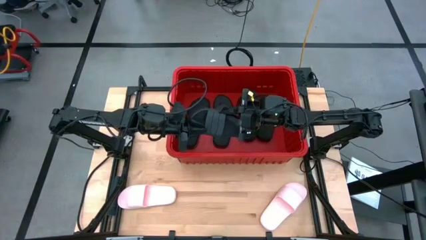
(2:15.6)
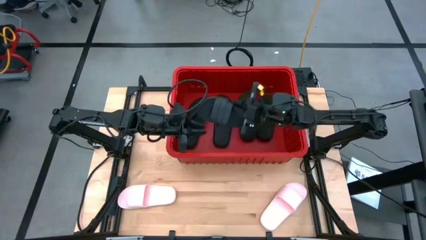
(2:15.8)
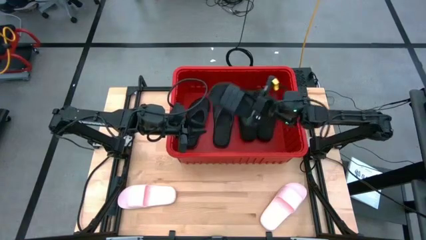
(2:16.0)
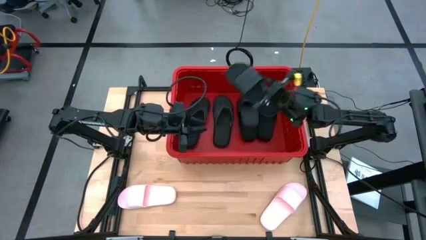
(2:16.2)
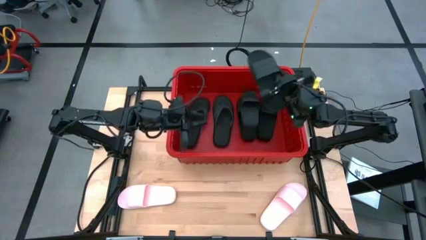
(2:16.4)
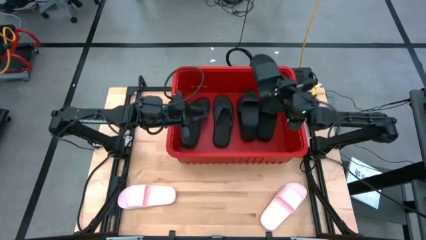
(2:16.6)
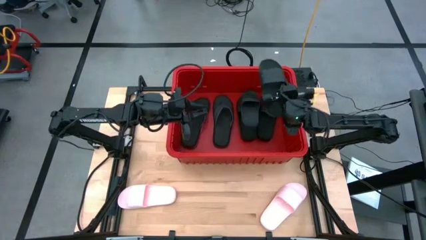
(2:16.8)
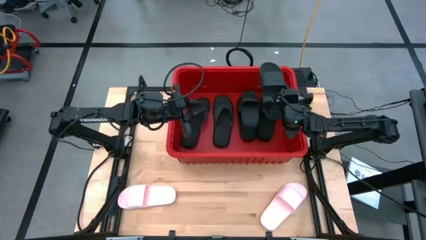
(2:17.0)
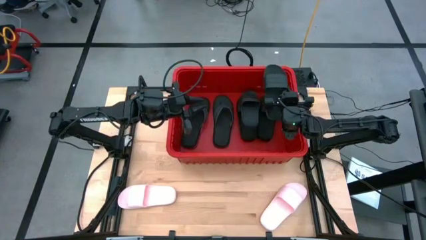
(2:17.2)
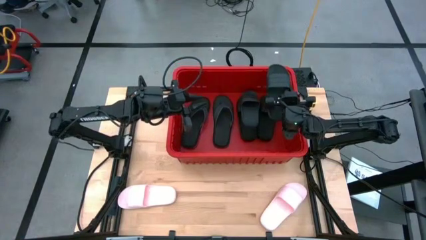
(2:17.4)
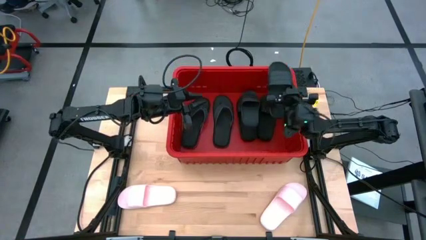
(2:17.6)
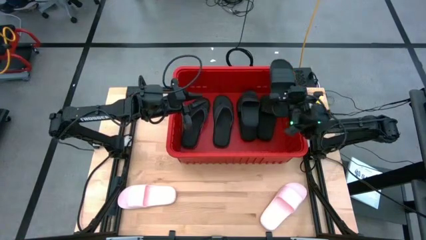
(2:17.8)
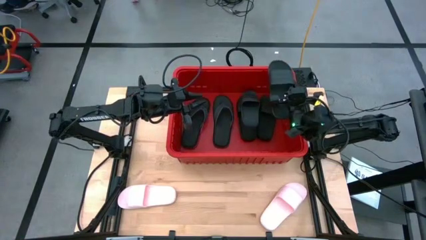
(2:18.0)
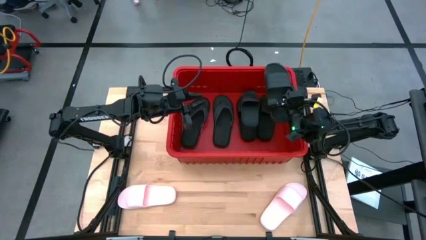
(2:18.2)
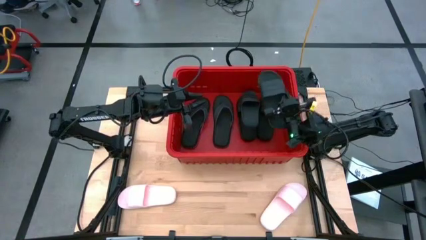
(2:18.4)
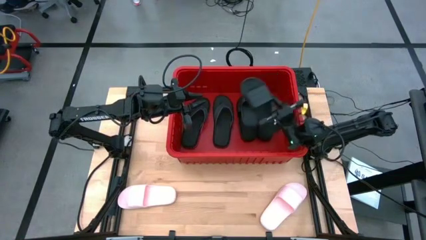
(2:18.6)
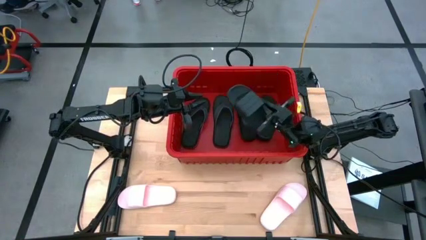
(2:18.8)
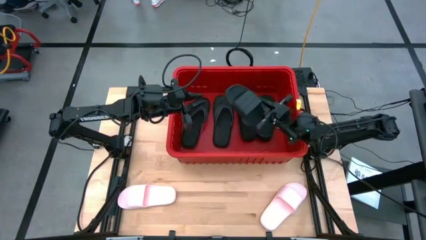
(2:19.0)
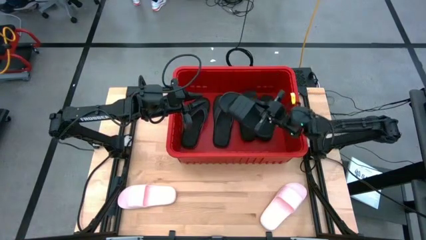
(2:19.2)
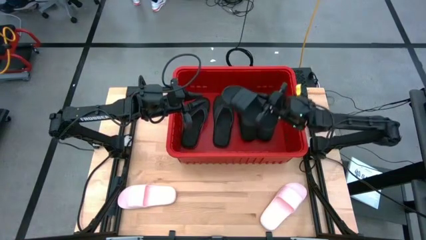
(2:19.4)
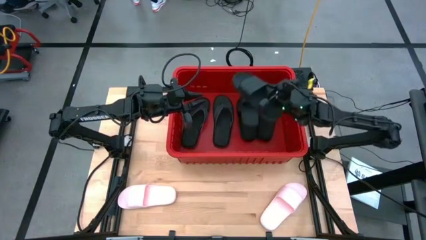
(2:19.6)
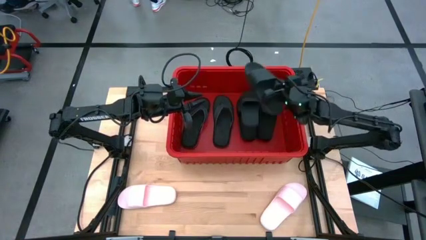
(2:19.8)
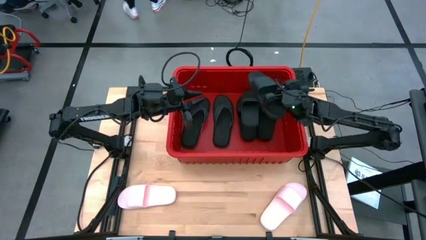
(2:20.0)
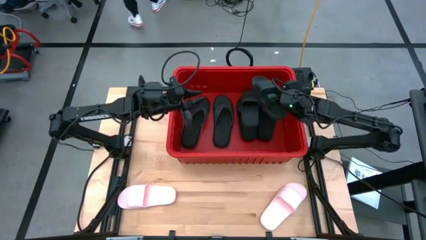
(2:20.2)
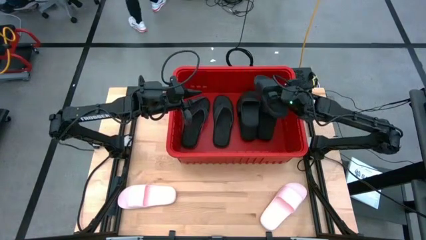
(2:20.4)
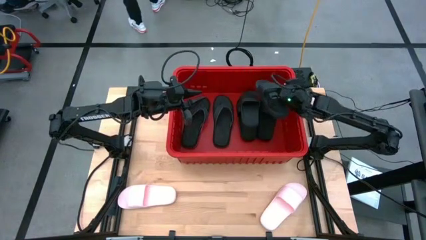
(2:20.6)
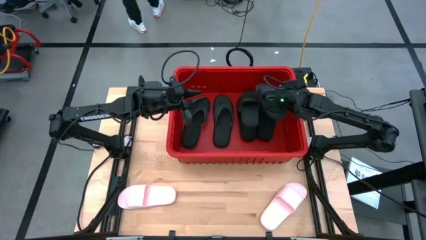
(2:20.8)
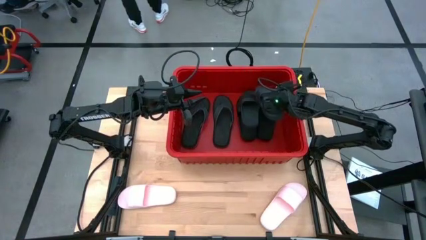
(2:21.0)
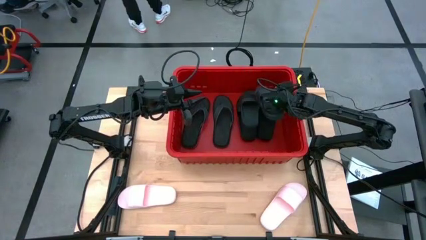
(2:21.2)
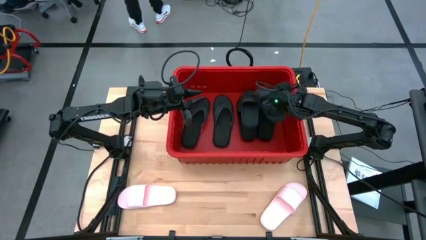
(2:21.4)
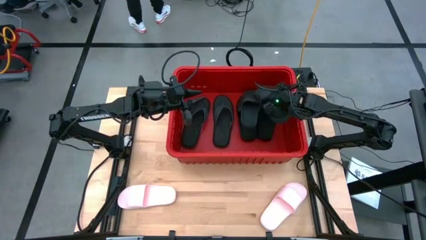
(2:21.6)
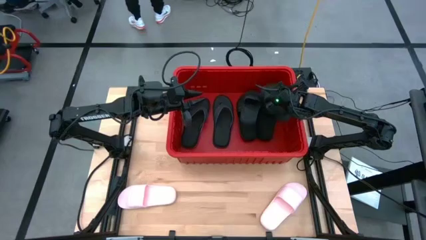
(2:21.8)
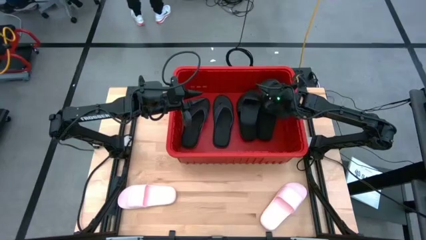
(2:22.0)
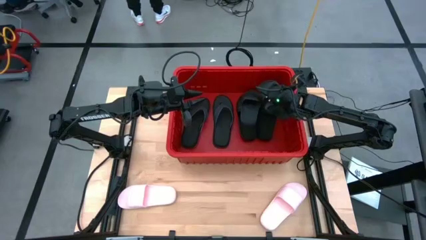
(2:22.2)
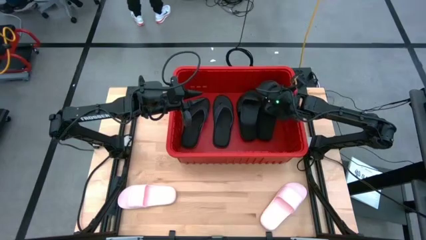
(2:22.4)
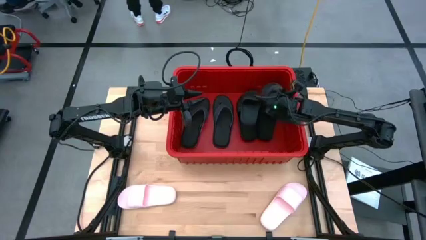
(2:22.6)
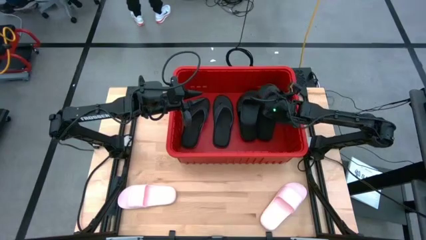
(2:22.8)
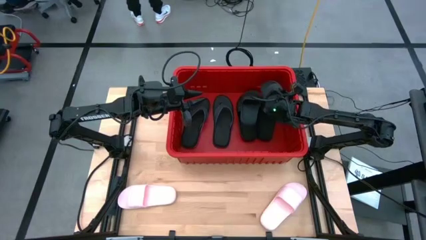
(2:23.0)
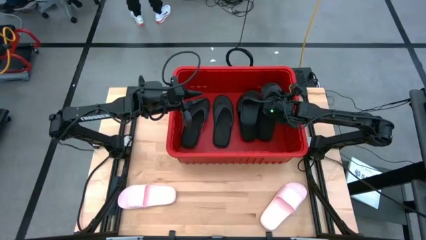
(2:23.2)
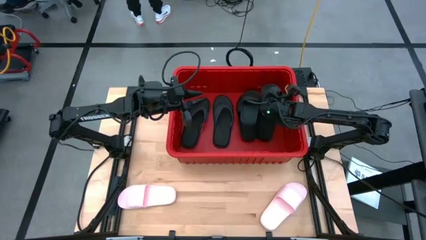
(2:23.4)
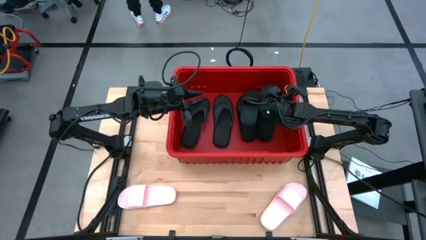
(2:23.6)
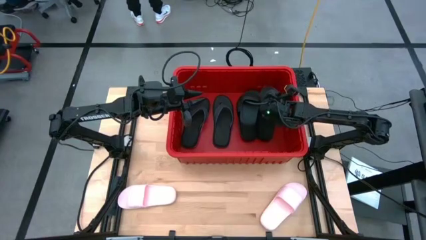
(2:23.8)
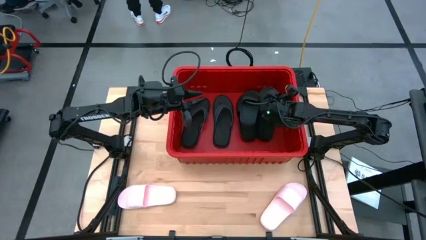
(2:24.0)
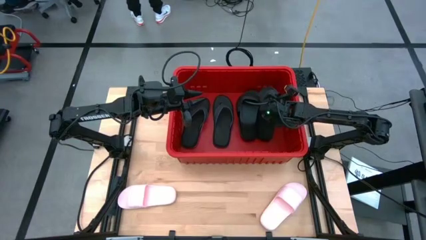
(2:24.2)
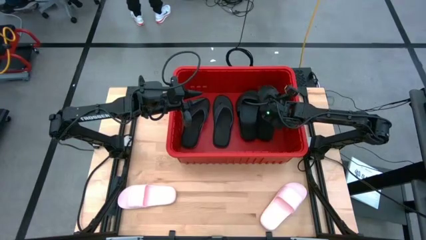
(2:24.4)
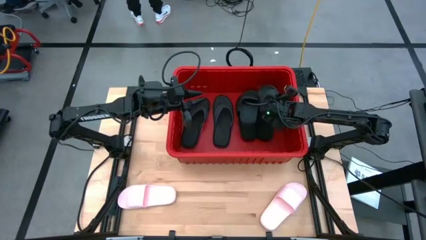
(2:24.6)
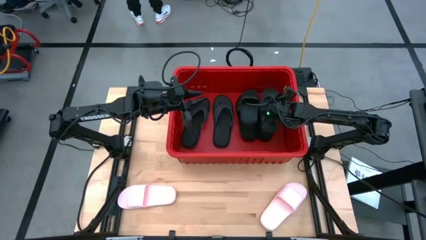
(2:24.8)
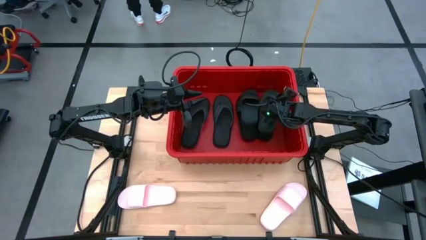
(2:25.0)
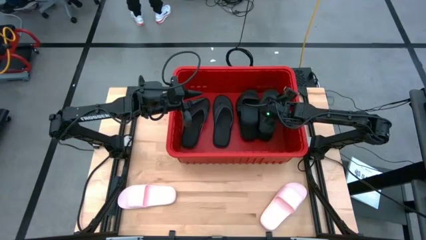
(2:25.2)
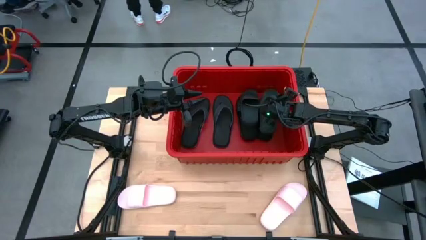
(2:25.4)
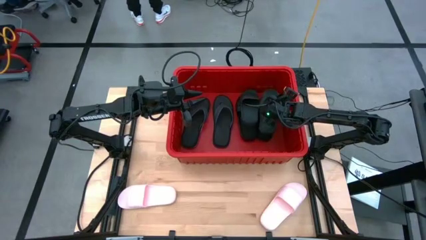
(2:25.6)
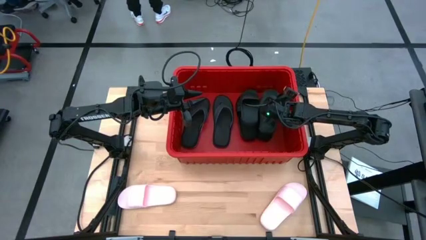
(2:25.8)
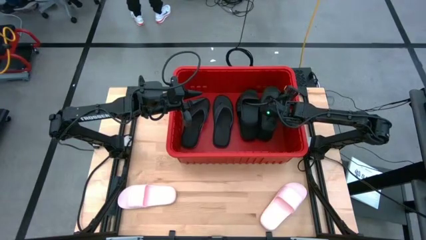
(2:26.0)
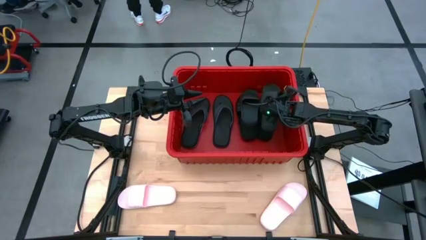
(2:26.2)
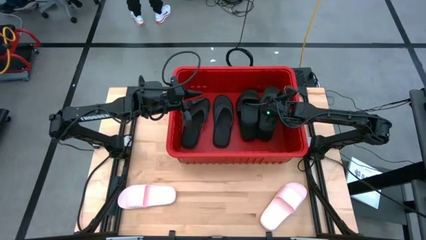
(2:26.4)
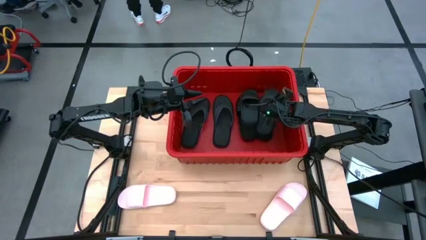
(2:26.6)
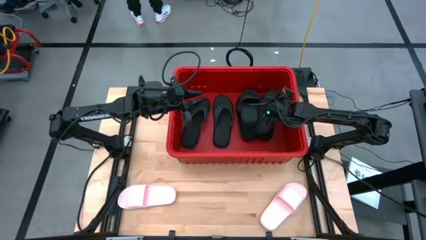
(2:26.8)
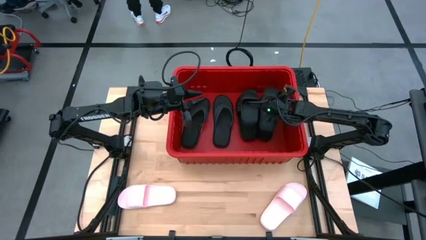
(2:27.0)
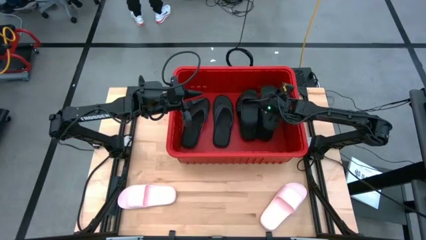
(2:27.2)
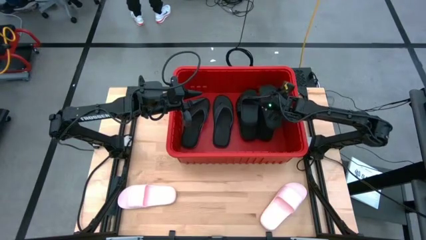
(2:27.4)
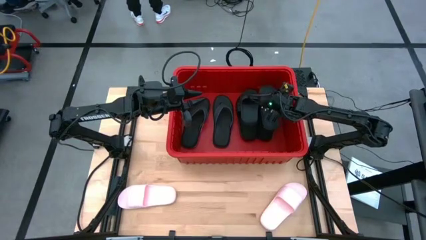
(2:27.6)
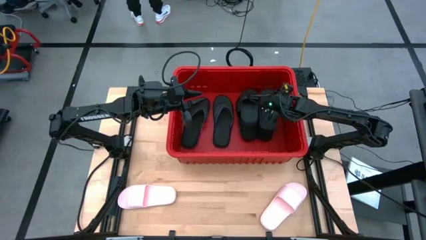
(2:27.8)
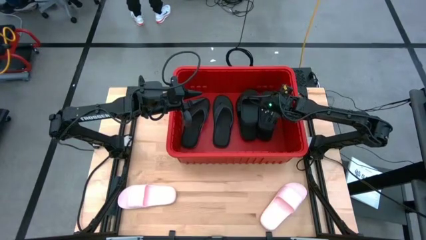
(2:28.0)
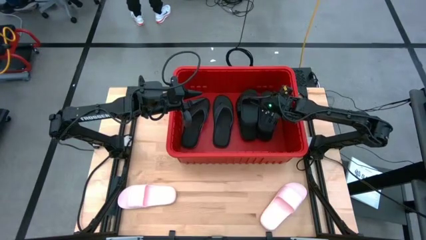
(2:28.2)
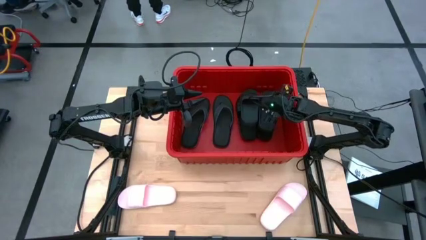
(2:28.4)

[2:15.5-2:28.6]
Task: Pick and place slides into bin
Put the black slide into the red bin

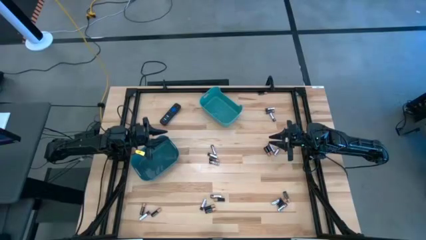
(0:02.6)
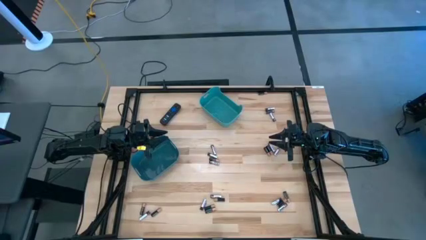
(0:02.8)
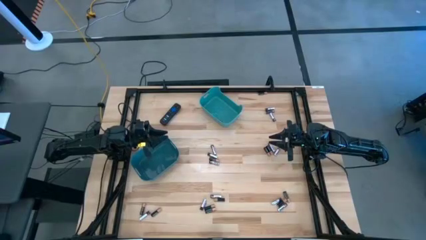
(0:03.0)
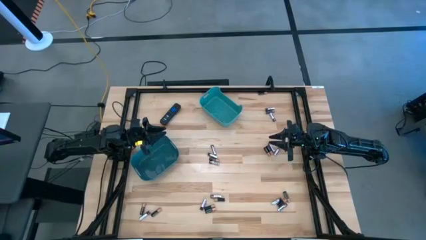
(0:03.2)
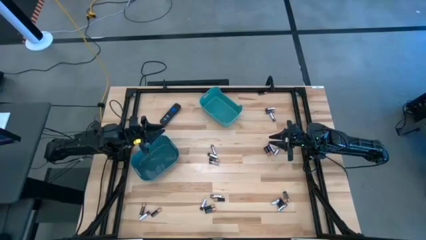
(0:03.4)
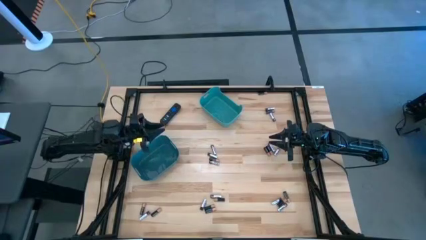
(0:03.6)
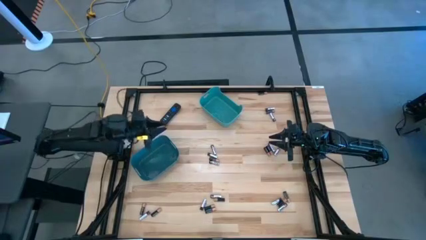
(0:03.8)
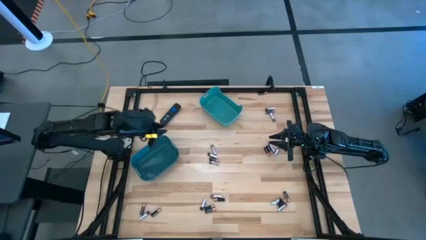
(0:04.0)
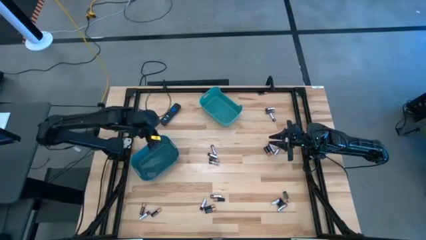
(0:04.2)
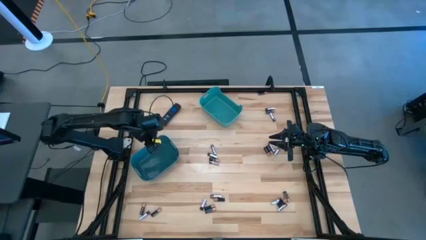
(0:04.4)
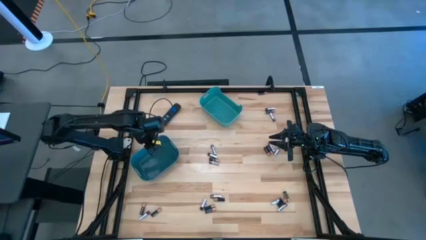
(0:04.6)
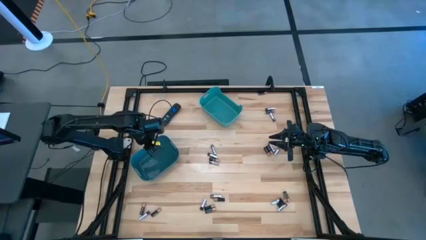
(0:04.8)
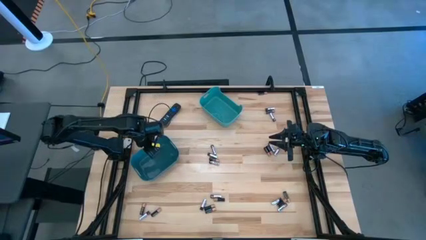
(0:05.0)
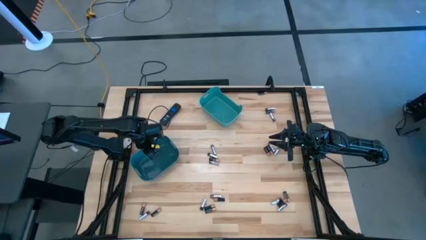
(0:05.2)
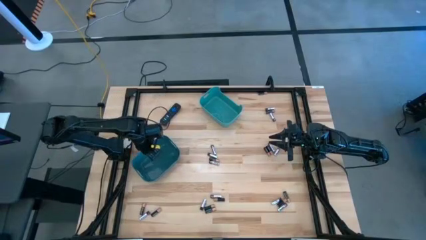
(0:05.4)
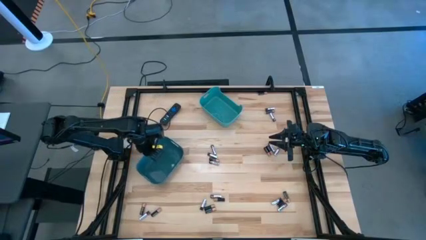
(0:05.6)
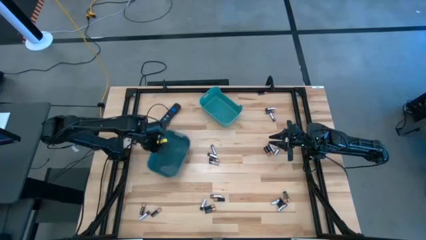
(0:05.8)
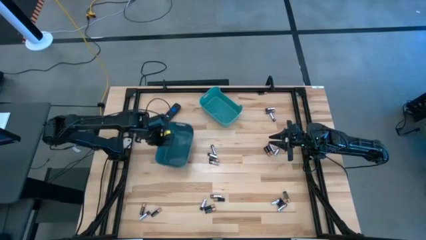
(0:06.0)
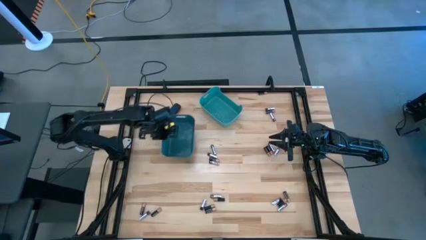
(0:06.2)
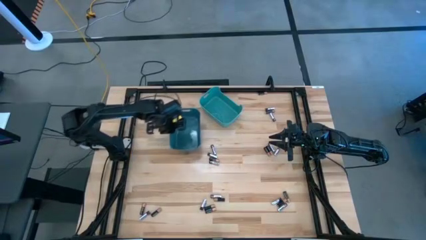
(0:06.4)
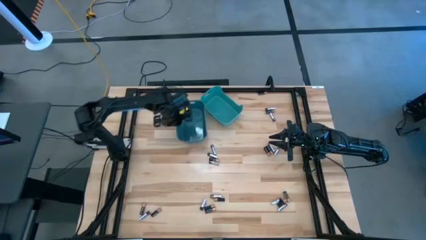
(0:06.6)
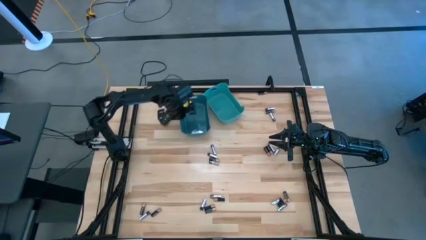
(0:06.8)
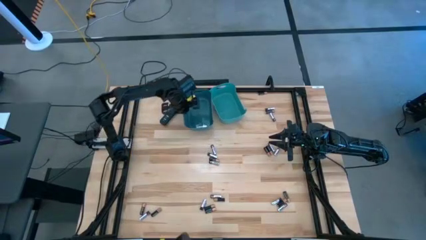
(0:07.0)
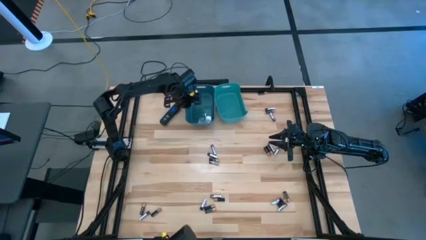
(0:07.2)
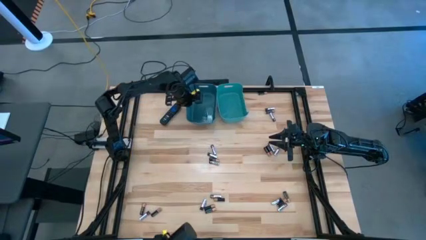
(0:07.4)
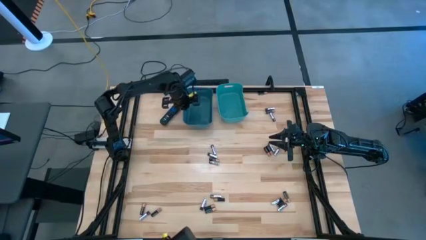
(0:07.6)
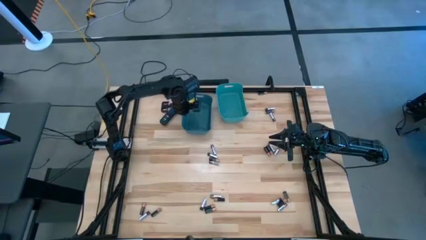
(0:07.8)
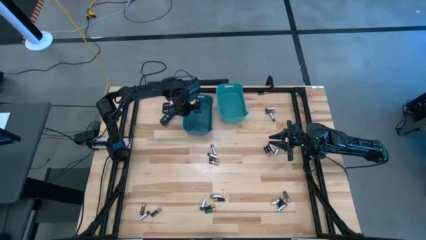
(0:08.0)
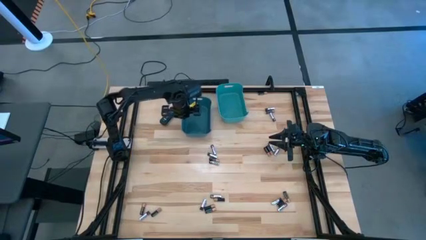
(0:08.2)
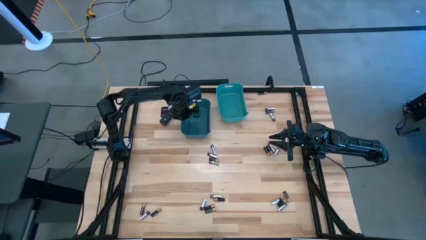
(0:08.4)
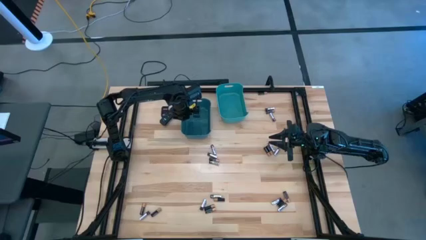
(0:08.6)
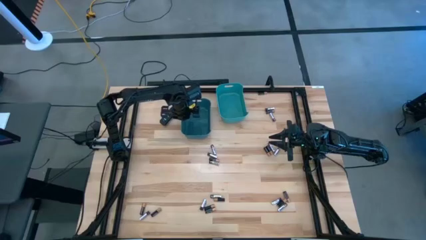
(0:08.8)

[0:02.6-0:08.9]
Task: Sort batteries
Move the bins to the middle top
